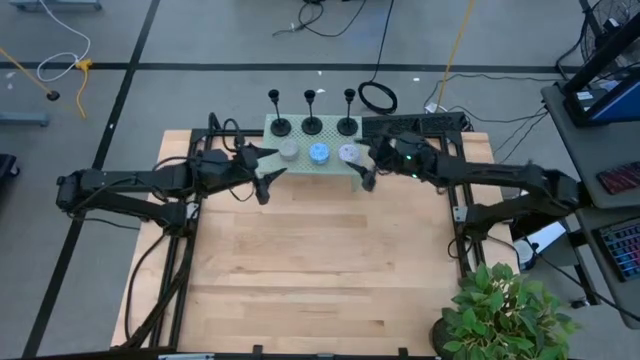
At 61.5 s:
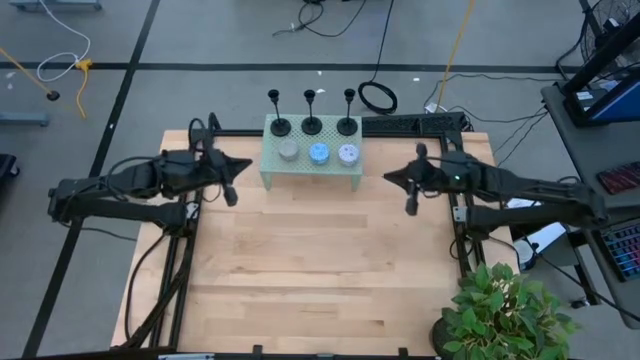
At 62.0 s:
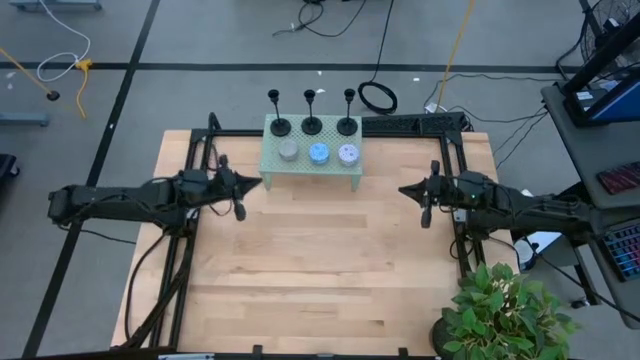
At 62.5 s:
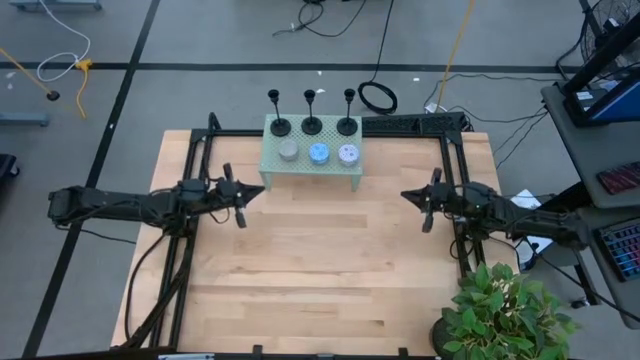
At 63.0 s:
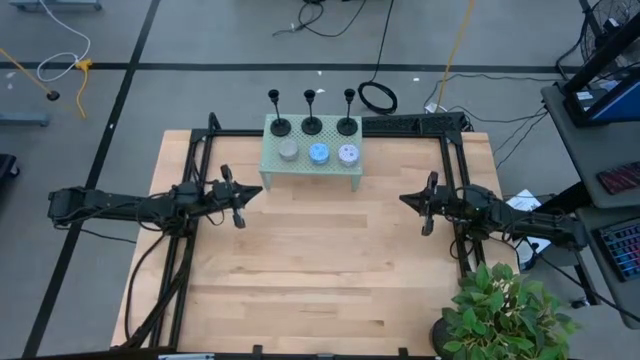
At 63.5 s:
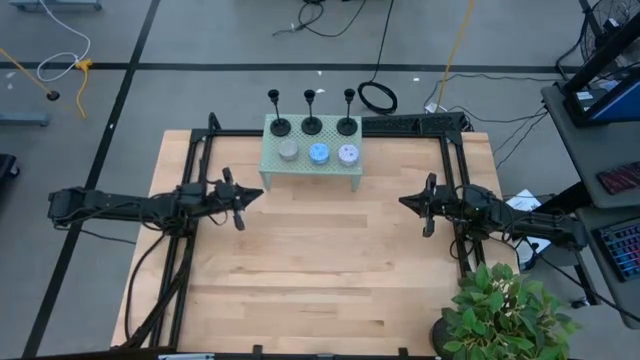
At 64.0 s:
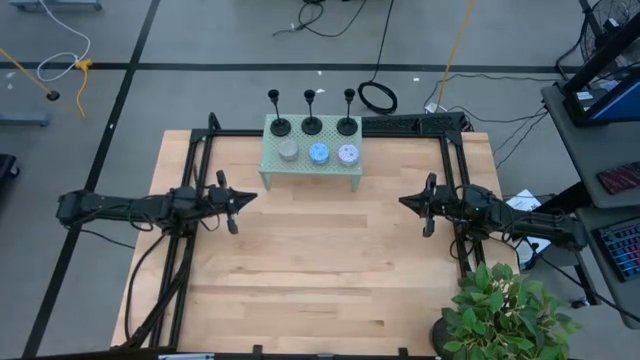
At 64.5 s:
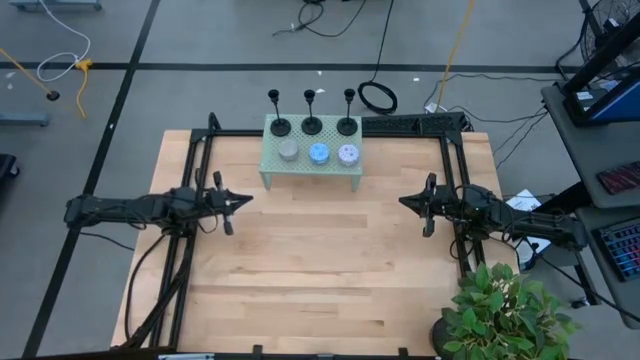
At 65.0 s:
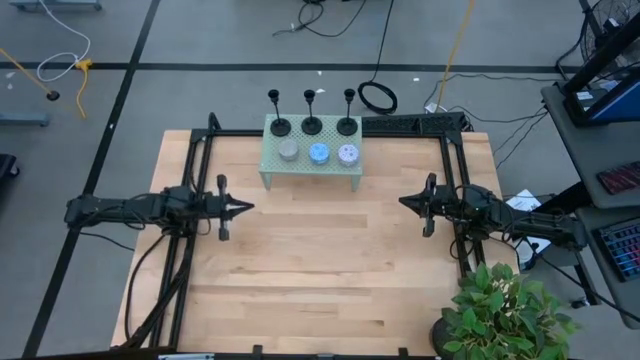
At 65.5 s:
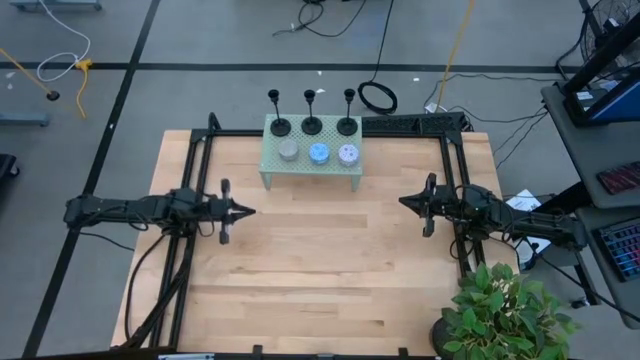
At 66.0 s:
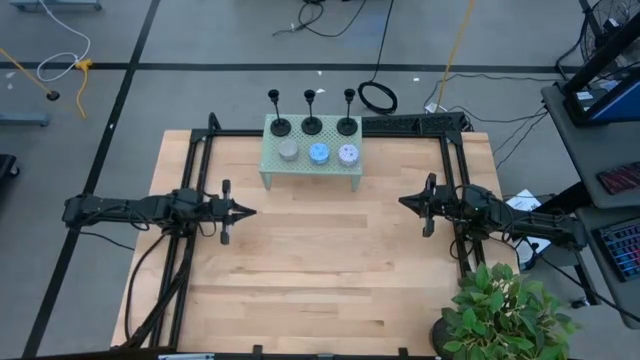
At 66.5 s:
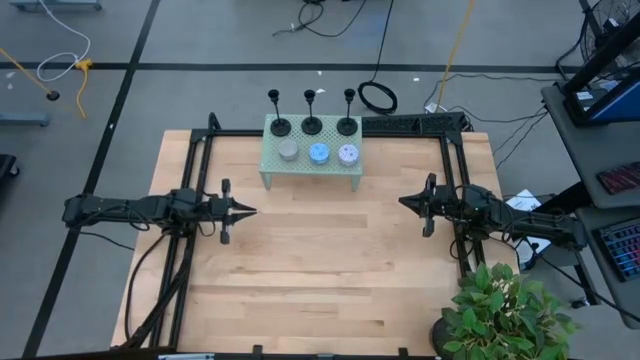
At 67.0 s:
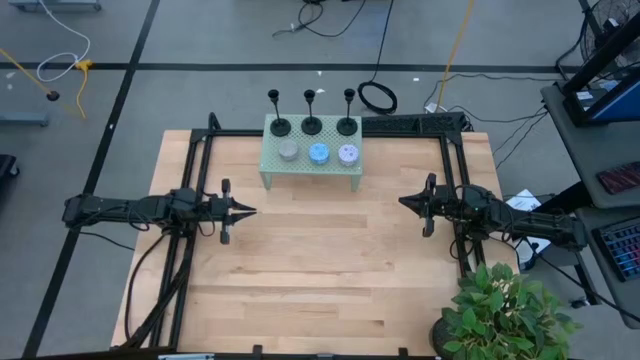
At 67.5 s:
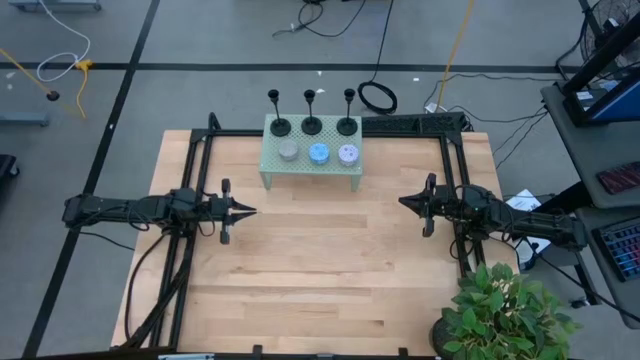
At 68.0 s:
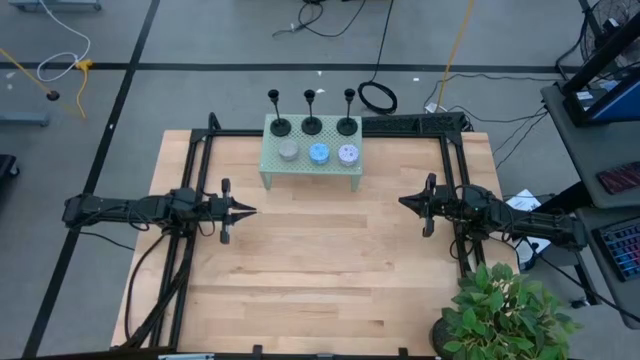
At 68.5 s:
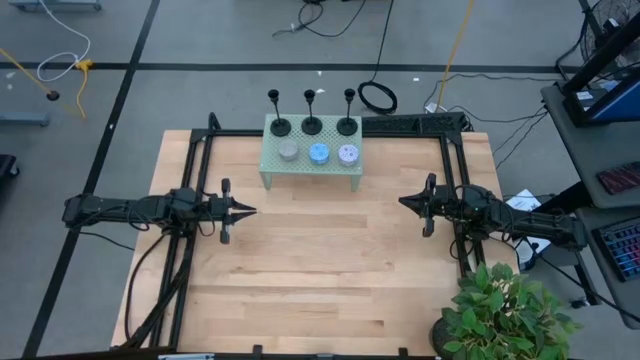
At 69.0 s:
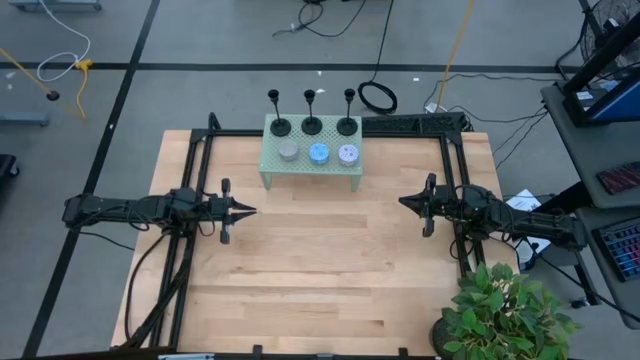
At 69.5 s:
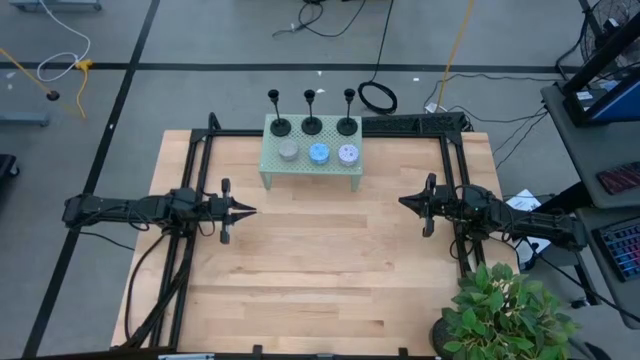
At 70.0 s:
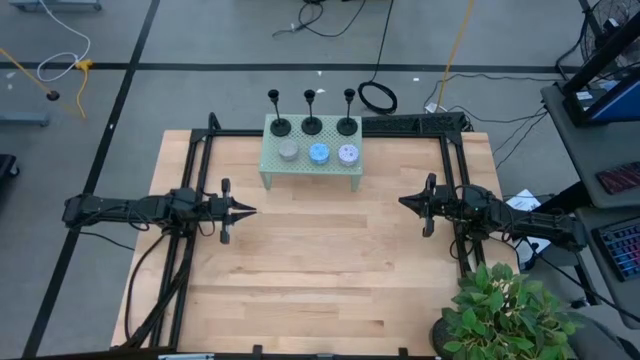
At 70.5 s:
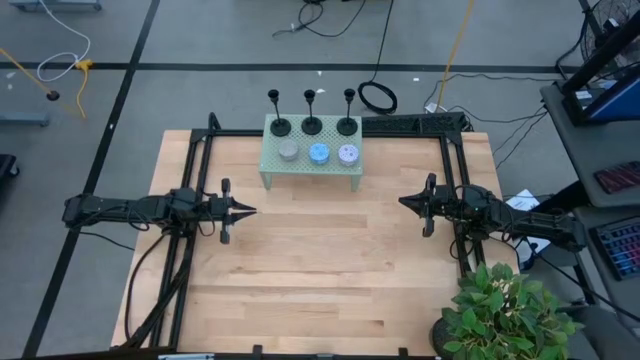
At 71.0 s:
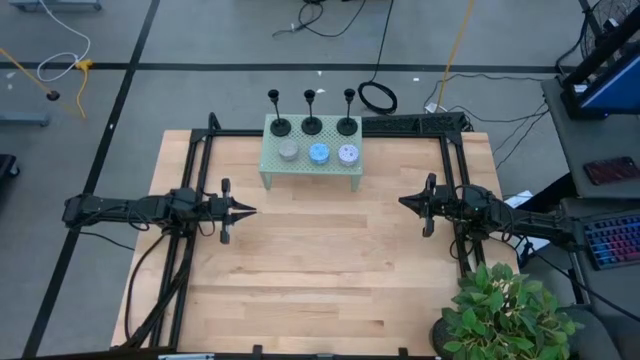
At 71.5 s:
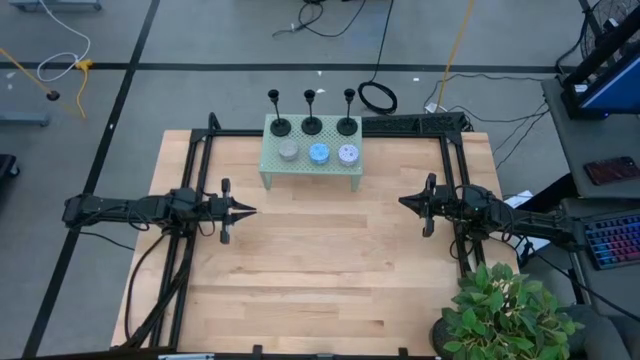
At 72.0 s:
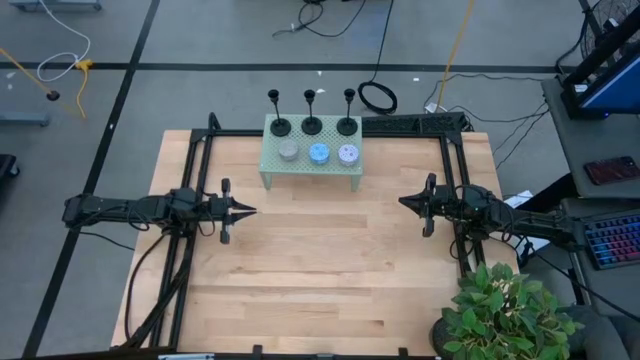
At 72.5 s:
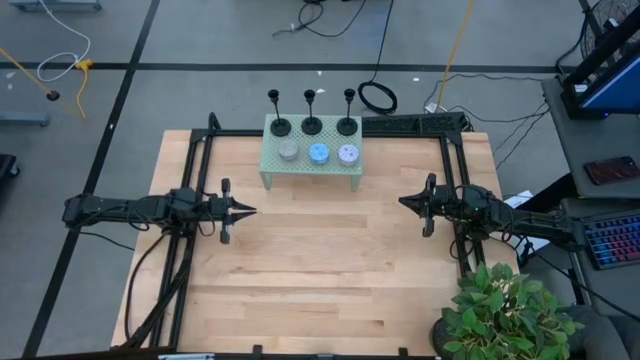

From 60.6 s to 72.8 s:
Task: Pick & Place candle stick holders
Return to Home Position

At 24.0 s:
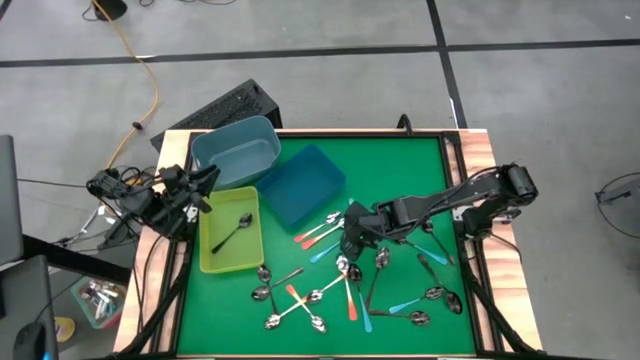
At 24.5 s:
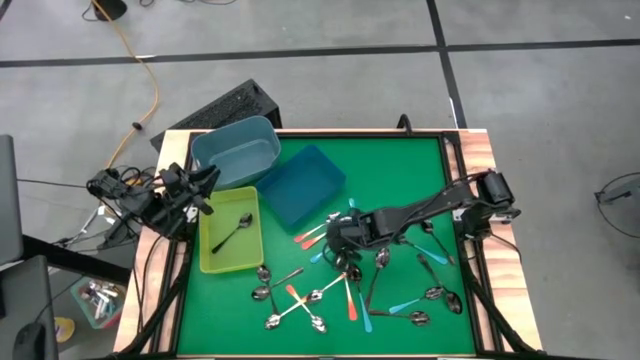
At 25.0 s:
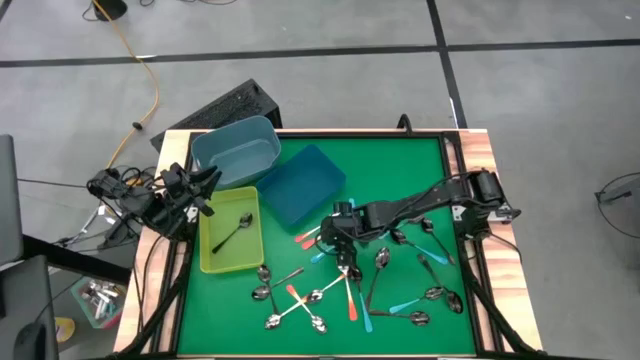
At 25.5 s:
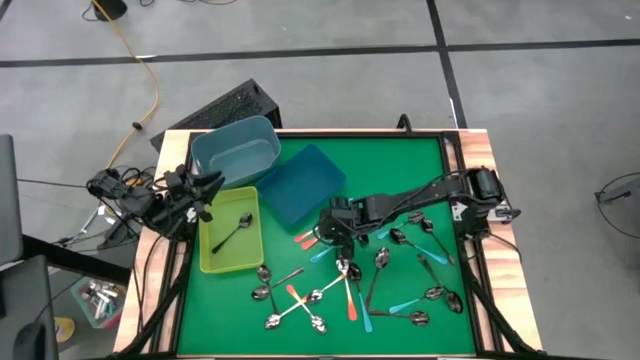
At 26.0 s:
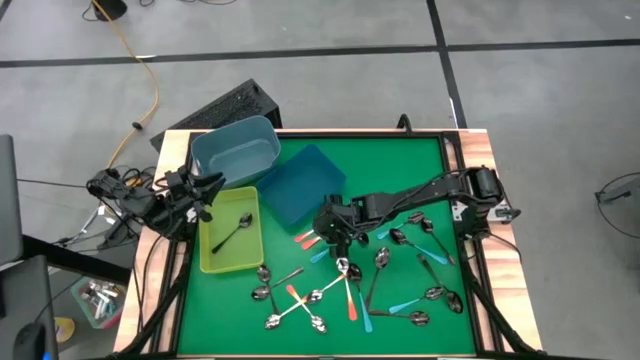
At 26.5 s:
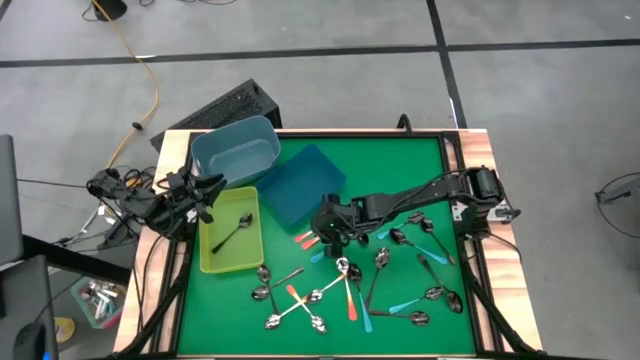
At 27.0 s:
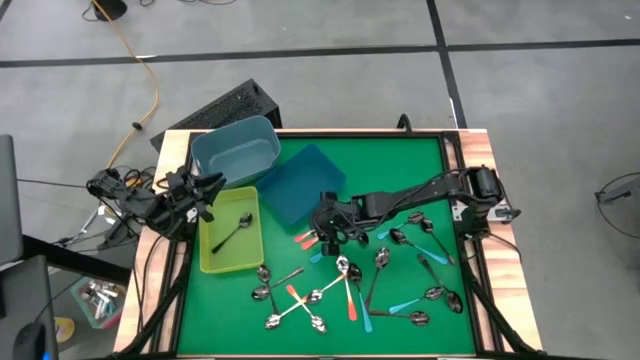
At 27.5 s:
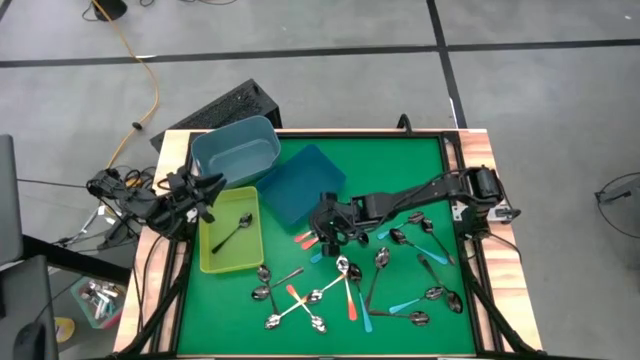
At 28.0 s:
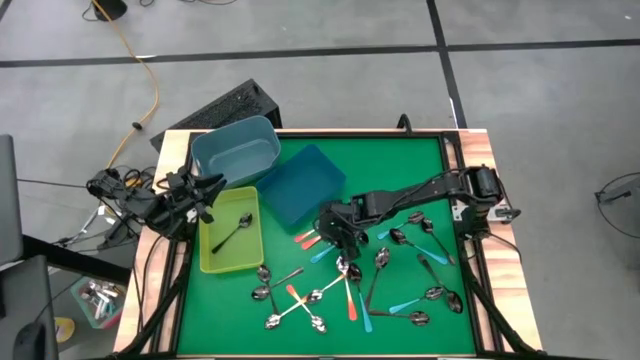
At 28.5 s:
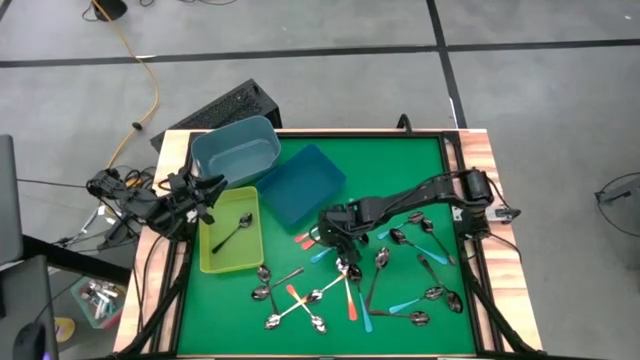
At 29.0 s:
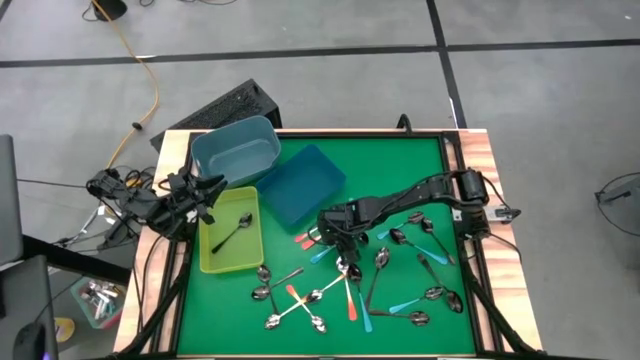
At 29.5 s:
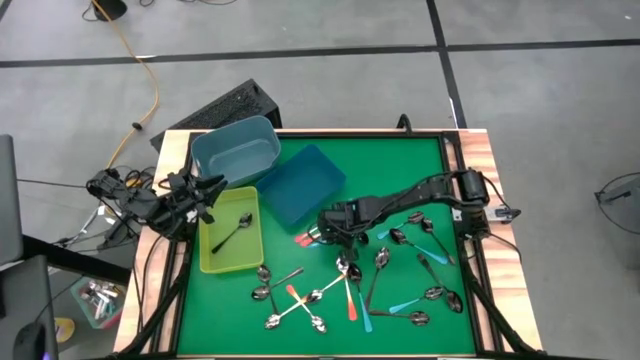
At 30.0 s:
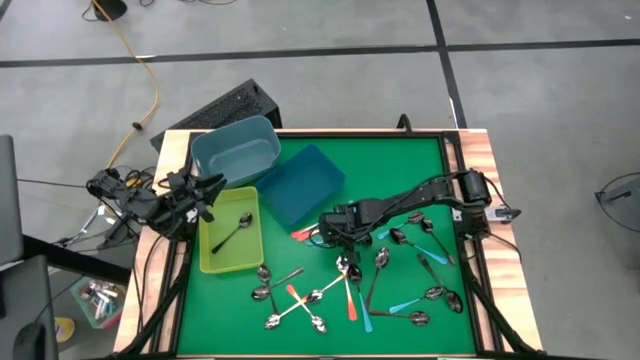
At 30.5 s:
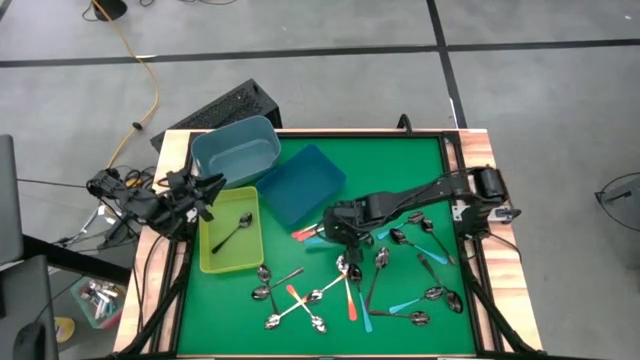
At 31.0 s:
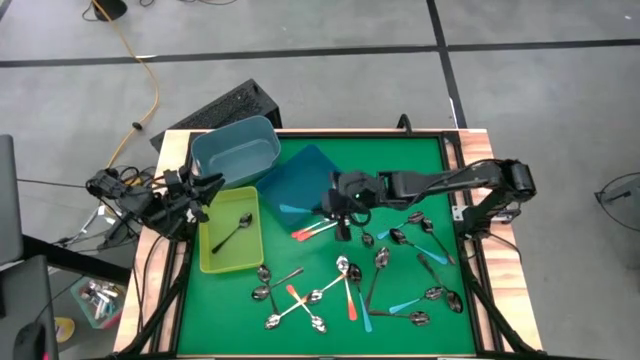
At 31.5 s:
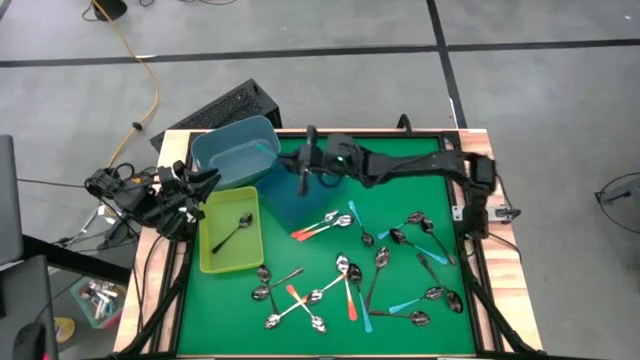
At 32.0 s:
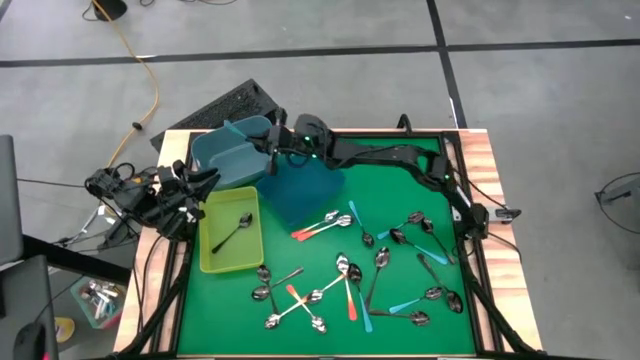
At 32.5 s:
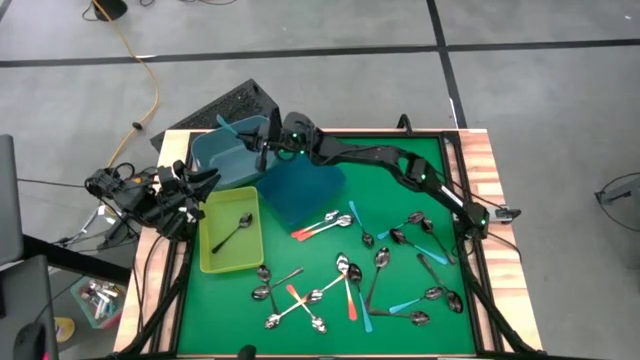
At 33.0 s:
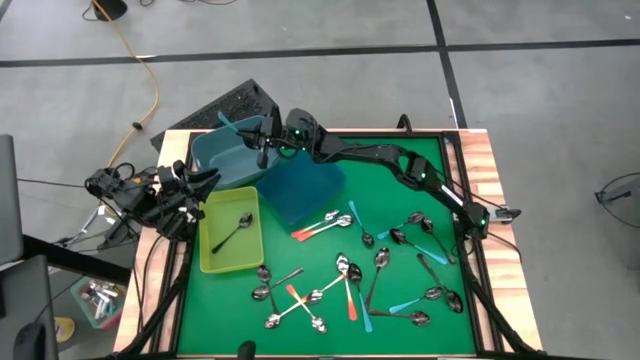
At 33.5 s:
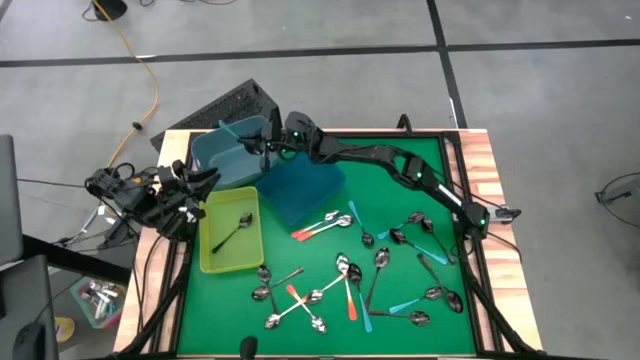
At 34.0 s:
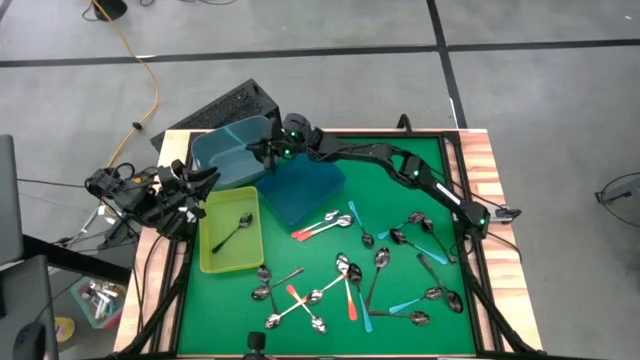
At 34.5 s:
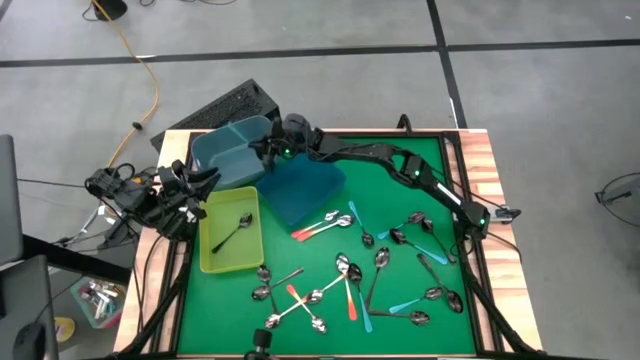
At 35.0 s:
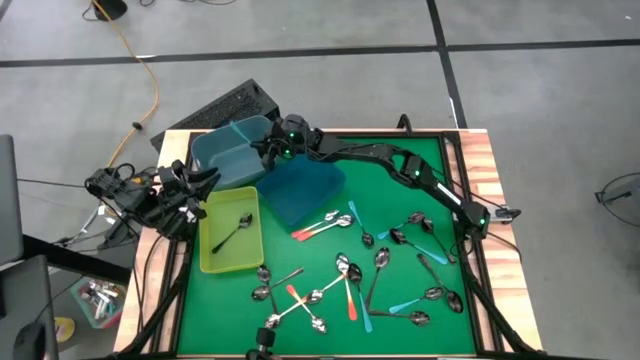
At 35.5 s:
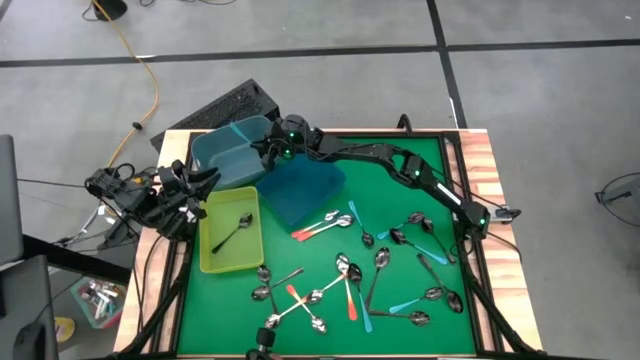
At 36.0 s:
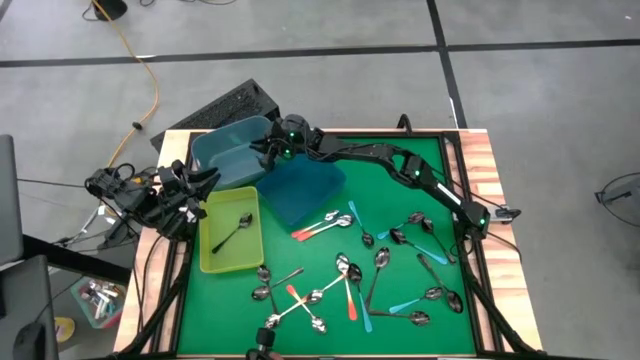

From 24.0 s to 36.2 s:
Task: Sort silverware by color (type)
Put the blue spoon into the light blue bin
